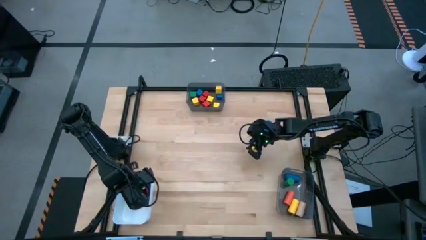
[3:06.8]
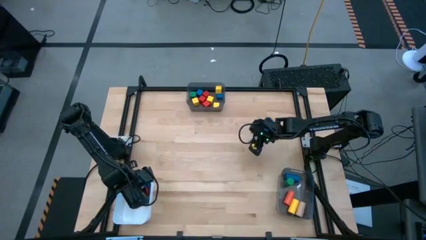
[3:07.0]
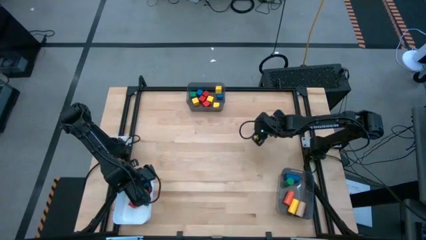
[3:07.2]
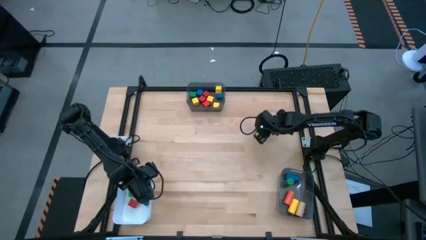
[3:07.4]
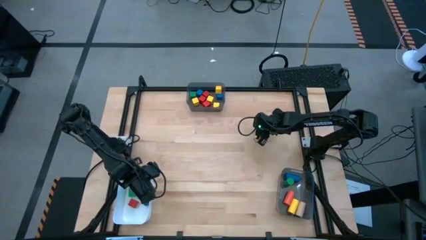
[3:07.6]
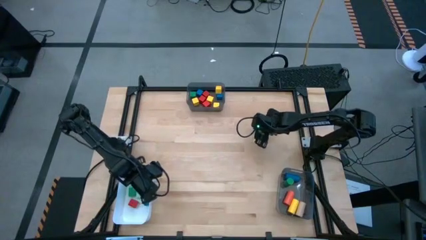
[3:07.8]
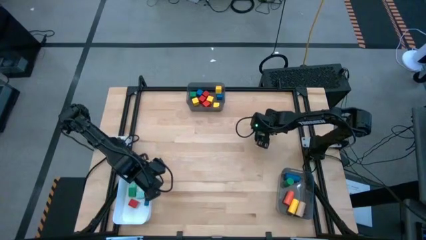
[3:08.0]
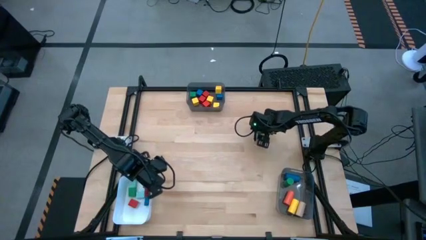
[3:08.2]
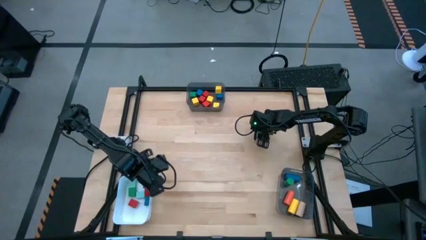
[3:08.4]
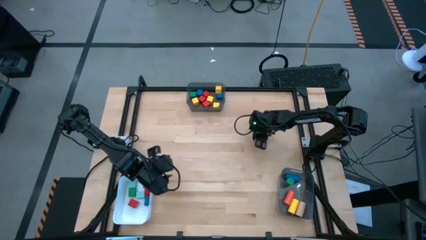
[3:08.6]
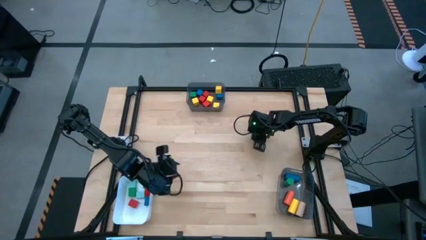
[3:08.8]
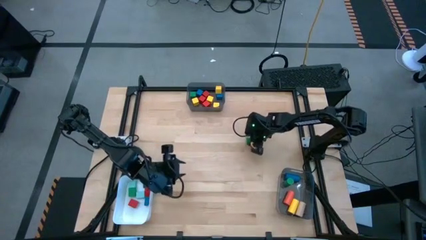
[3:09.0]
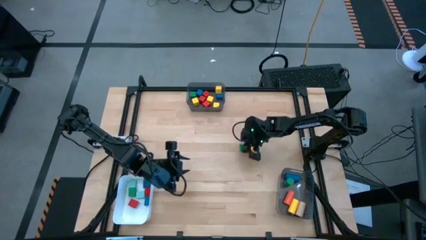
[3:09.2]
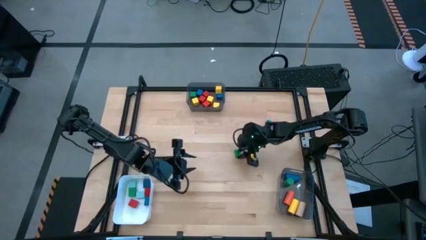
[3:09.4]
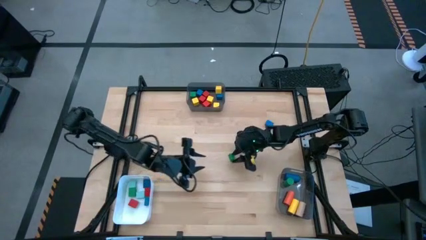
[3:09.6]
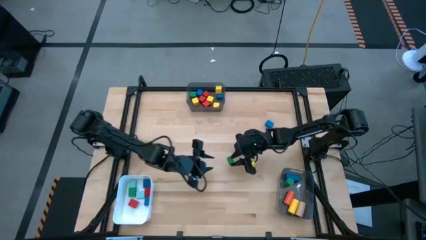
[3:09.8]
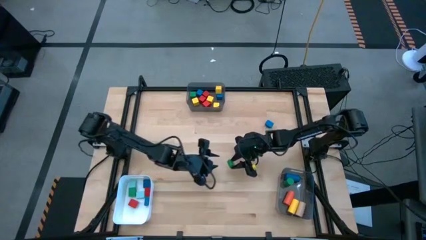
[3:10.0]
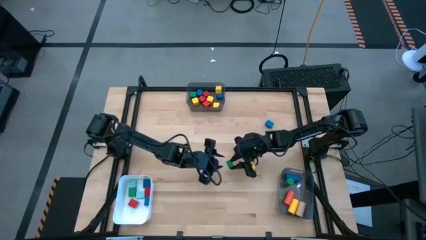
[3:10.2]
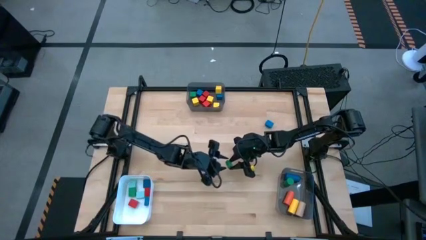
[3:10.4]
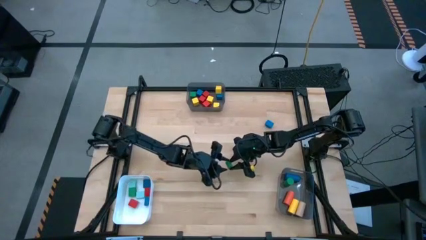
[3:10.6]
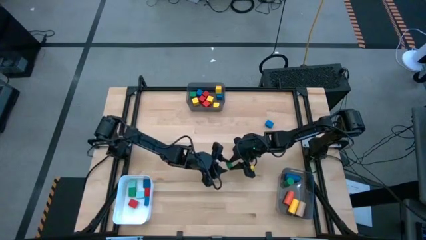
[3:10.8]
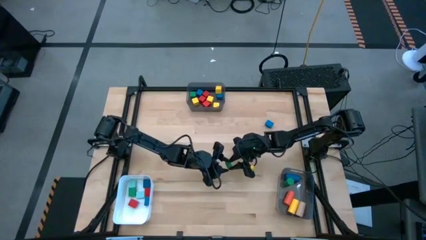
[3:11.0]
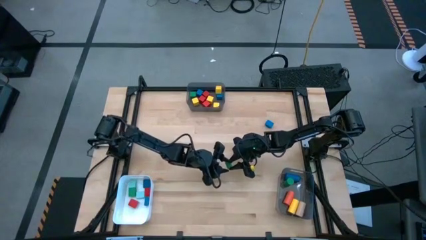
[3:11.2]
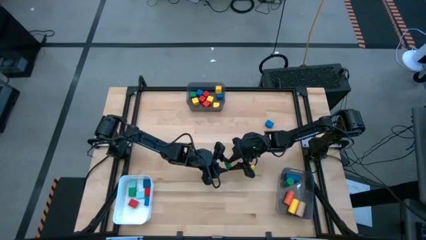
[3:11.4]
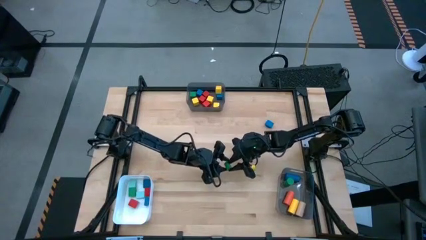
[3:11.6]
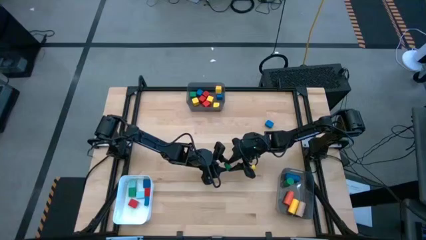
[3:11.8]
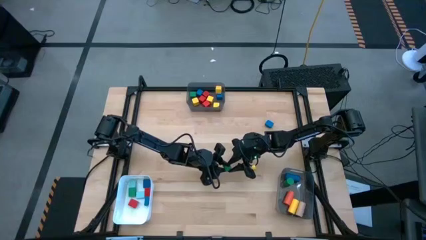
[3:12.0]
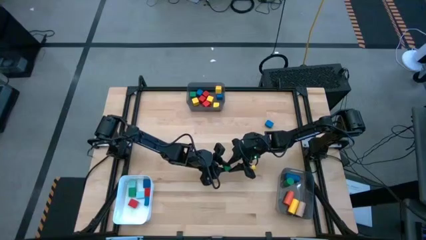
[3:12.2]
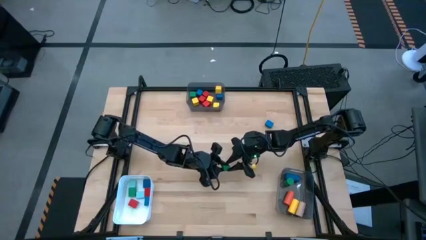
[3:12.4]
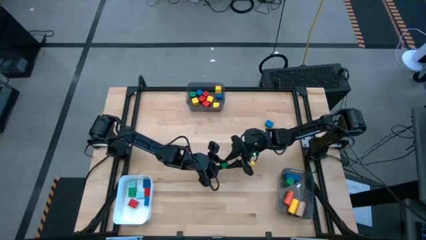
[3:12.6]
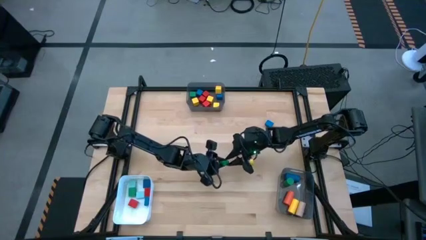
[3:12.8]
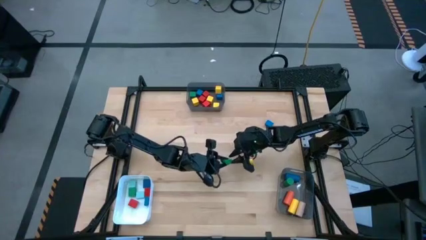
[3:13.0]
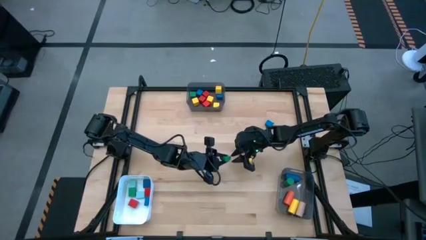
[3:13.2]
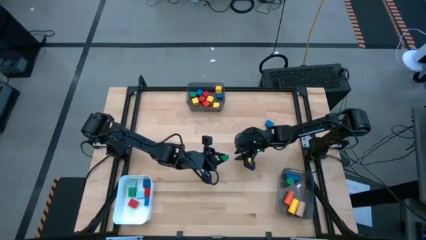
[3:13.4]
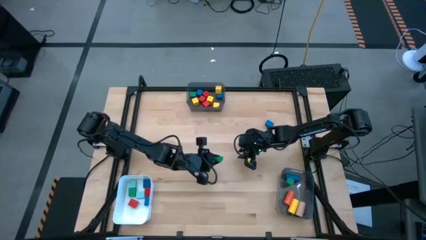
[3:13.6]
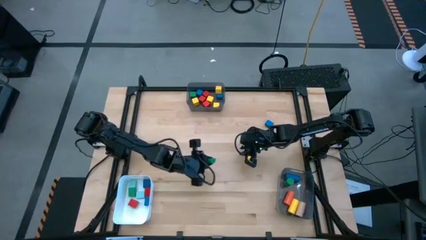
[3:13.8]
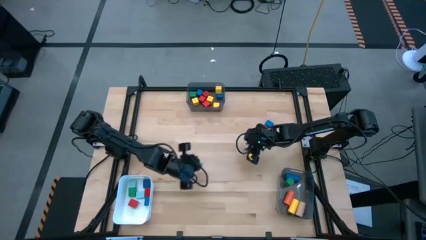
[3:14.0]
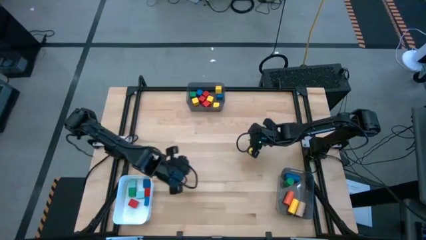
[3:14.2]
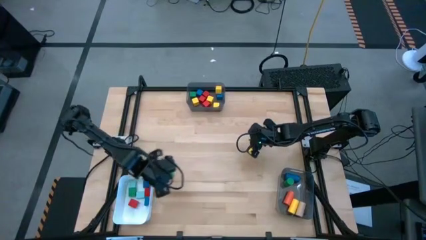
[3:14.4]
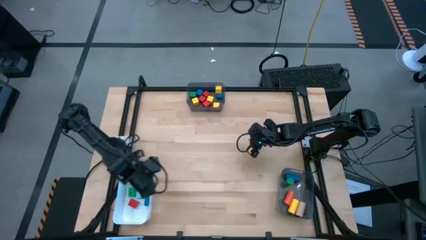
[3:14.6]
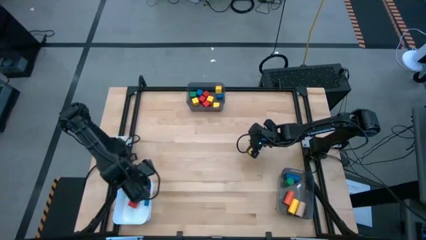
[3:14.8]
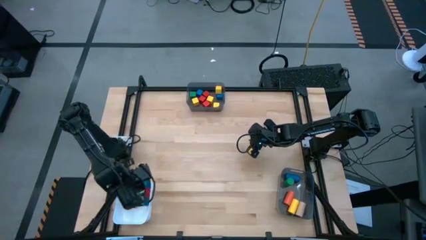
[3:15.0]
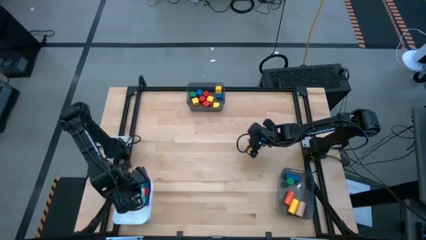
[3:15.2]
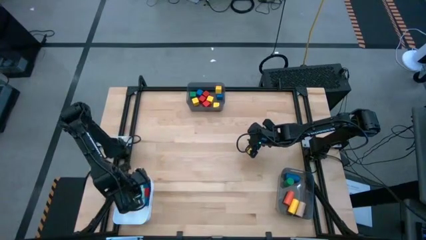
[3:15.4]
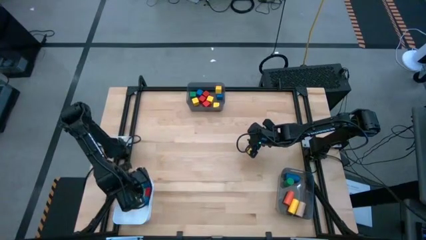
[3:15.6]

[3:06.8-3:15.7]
Task: Sort blocks by size
Put the green half circle block into the white bin

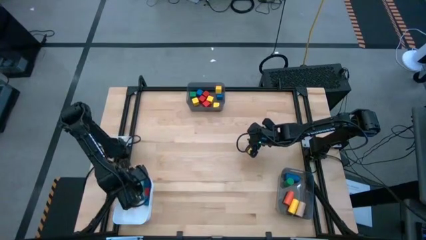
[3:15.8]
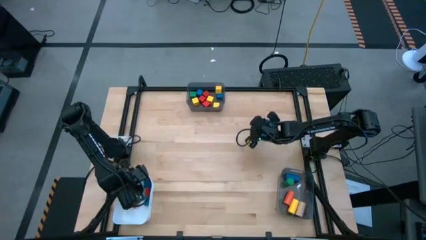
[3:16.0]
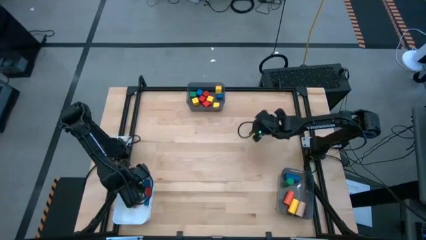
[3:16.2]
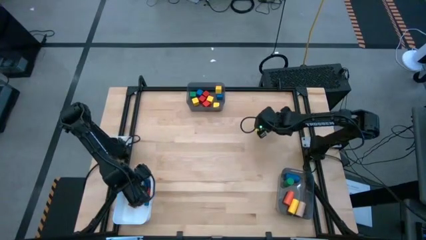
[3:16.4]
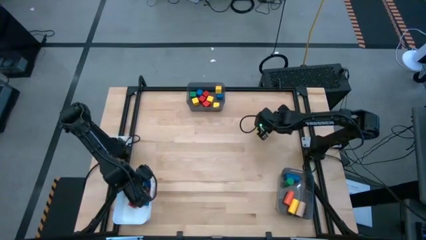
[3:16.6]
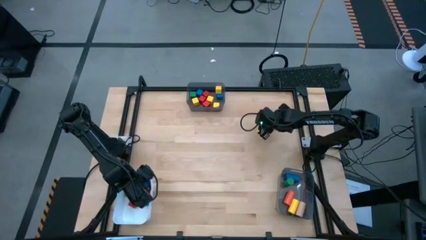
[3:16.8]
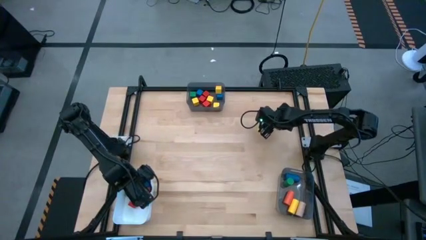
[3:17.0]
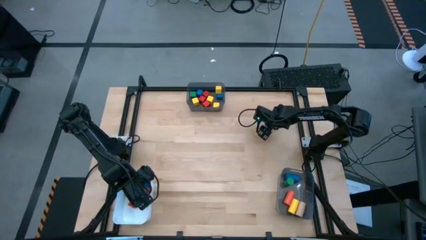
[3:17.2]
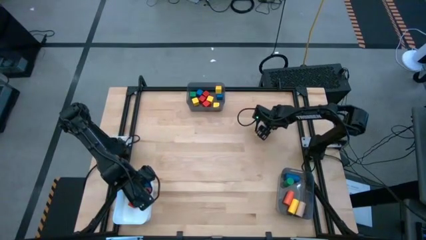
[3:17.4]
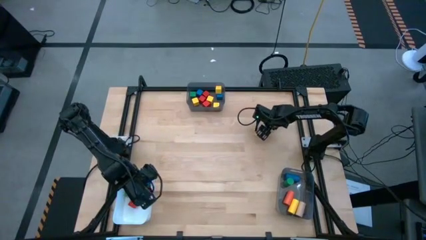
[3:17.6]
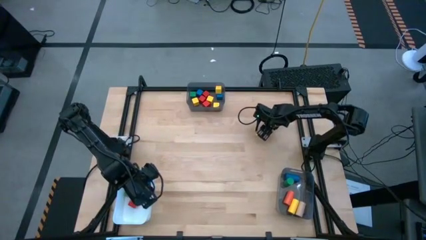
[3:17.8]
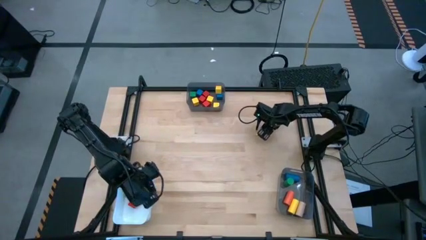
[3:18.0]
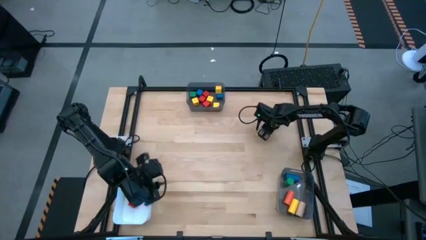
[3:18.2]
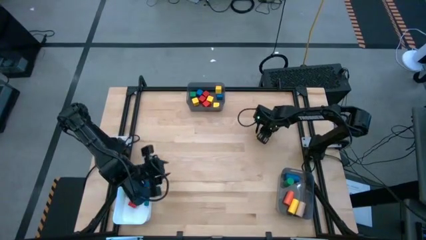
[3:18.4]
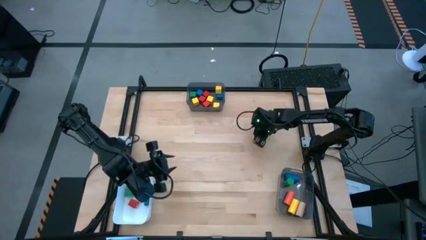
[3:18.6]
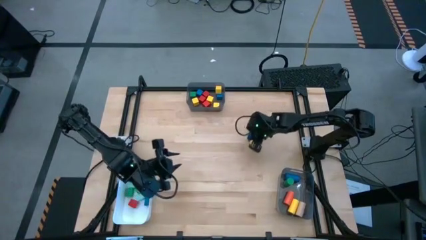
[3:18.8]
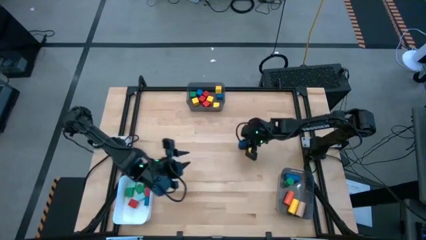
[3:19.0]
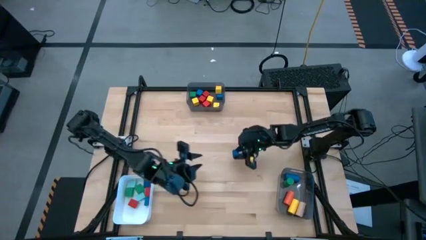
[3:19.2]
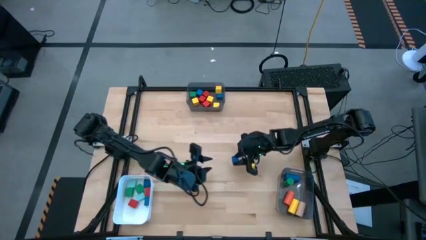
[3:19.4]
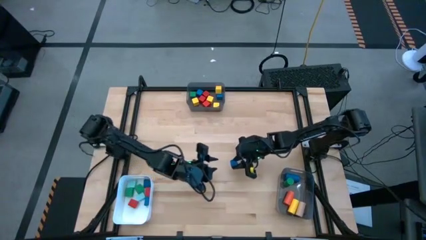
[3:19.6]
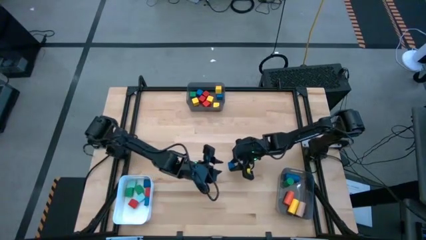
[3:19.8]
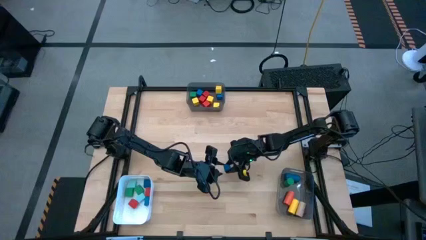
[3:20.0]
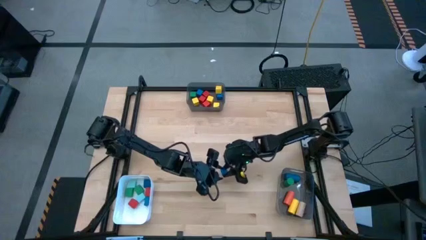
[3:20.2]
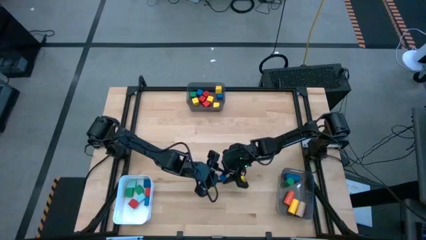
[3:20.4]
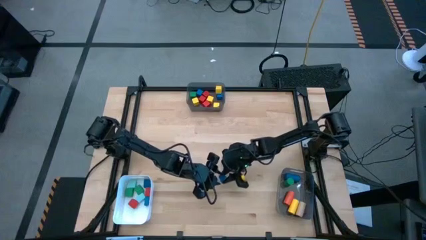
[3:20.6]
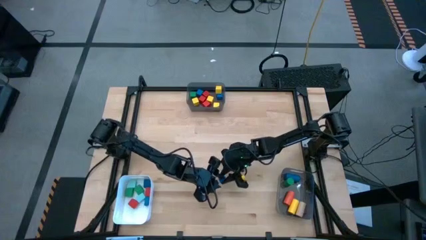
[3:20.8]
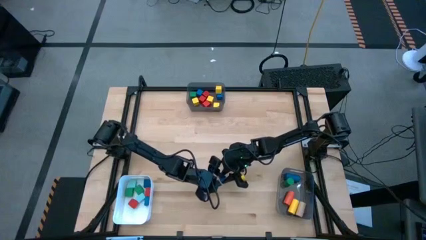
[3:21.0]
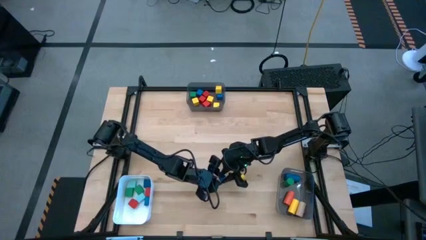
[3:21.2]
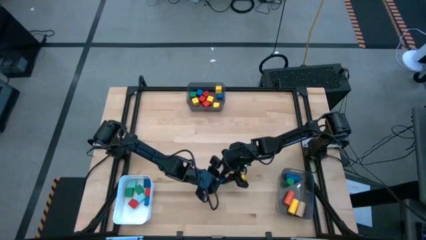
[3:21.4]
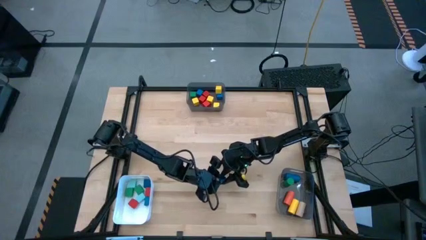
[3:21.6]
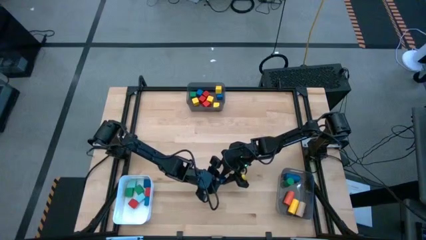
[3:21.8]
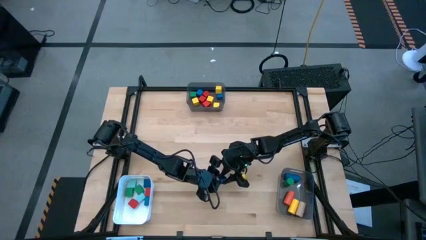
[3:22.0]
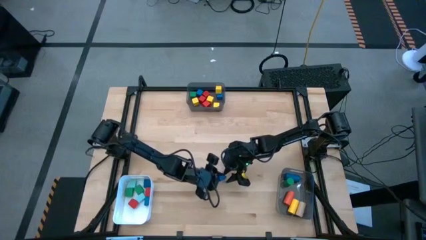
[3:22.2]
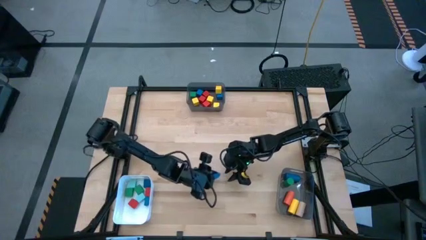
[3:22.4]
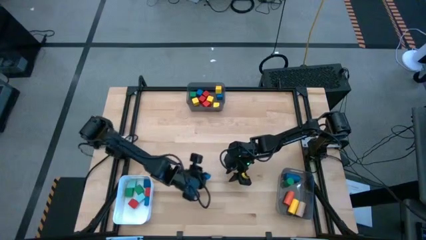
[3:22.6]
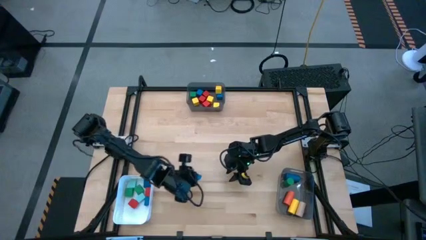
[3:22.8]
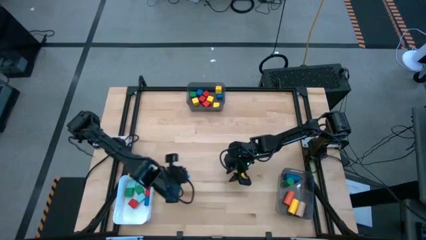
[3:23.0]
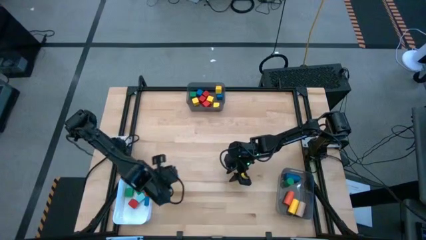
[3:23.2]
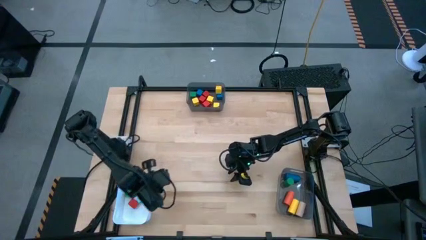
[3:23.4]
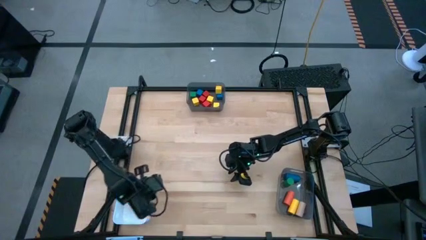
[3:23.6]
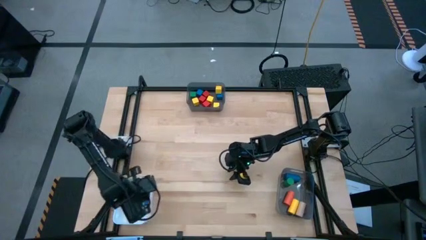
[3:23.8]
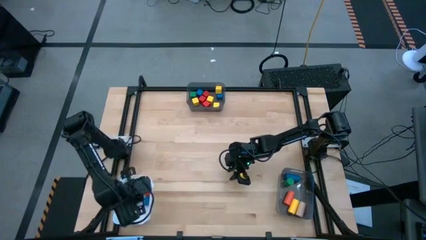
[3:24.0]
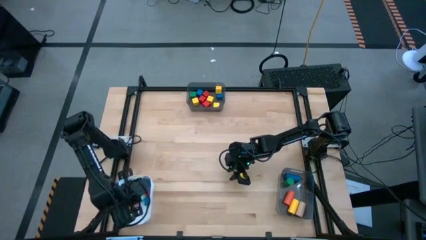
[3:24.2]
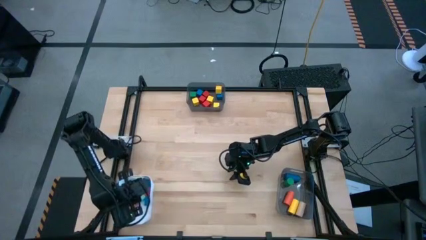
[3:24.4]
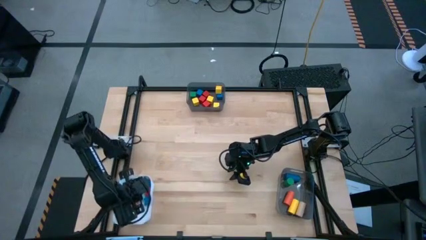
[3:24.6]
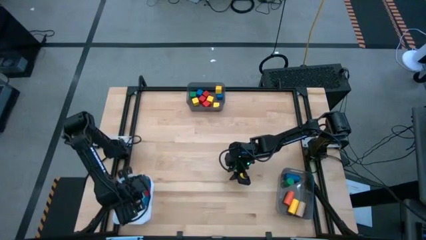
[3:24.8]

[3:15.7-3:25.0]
Put the blue half circle block into the white bin
